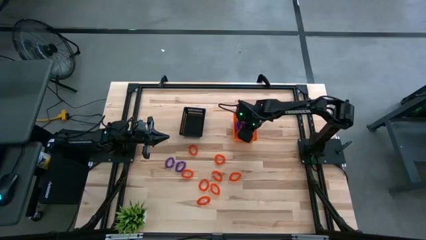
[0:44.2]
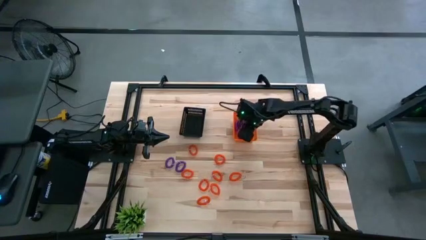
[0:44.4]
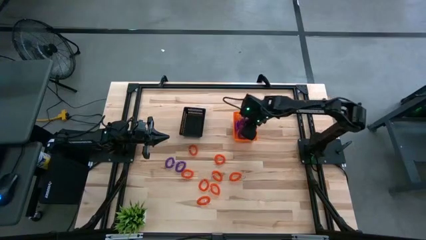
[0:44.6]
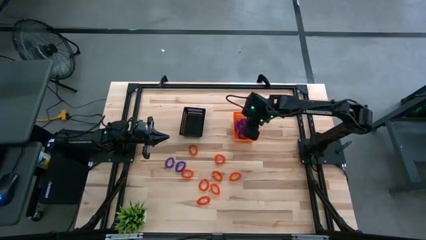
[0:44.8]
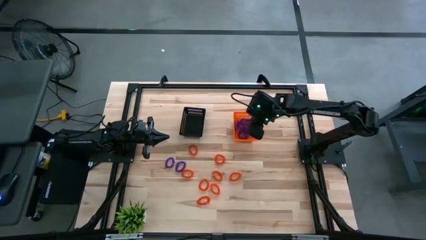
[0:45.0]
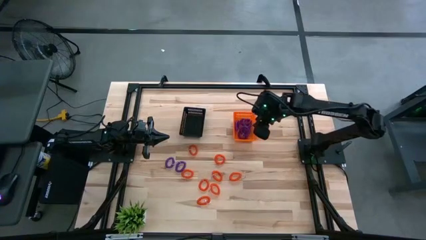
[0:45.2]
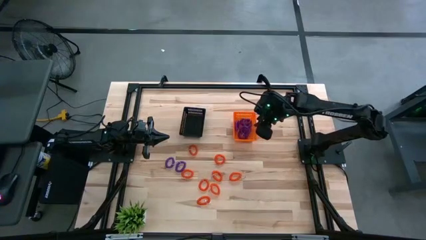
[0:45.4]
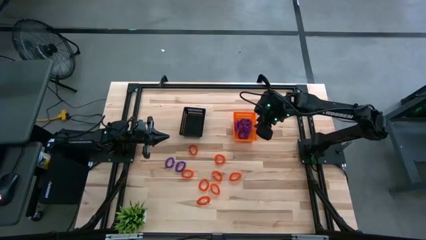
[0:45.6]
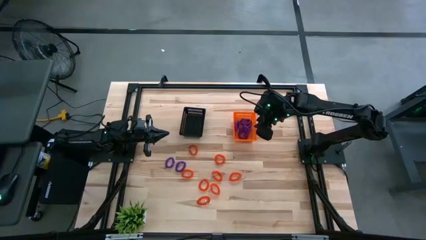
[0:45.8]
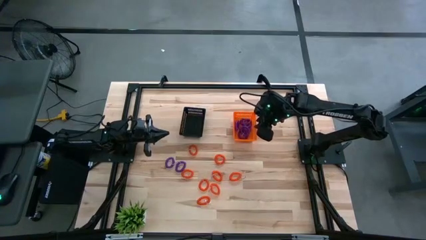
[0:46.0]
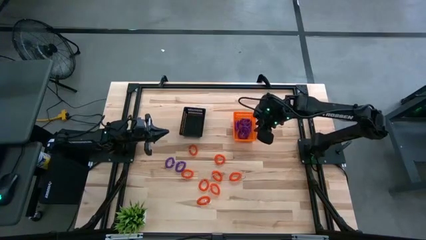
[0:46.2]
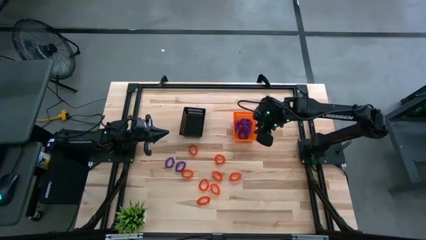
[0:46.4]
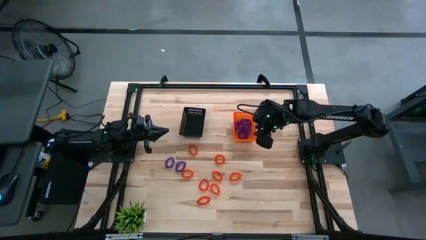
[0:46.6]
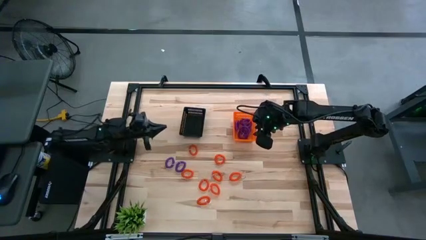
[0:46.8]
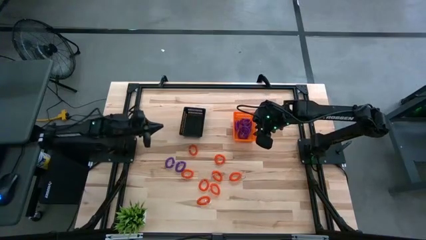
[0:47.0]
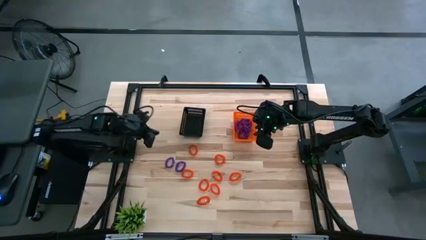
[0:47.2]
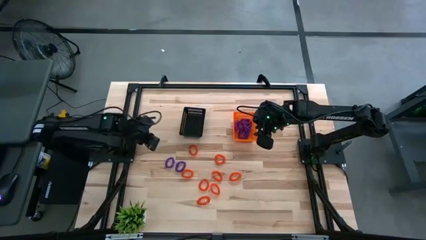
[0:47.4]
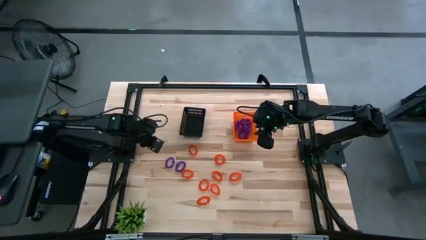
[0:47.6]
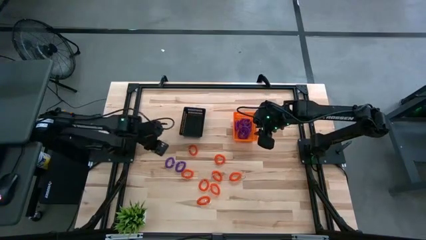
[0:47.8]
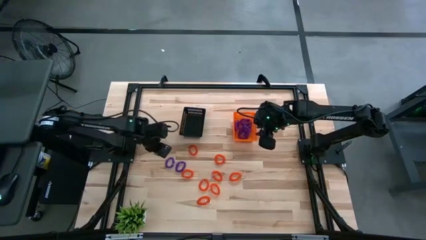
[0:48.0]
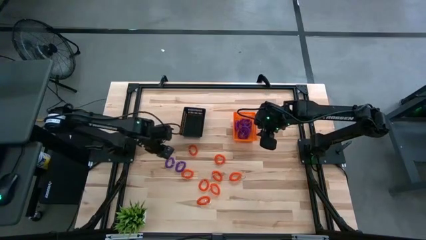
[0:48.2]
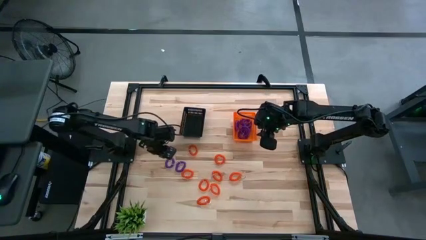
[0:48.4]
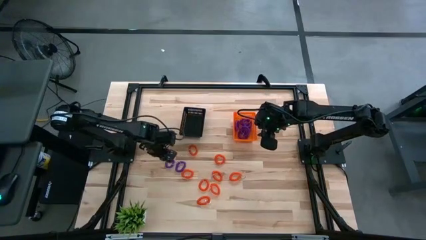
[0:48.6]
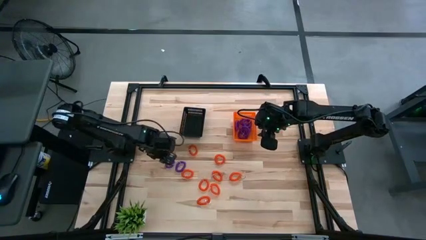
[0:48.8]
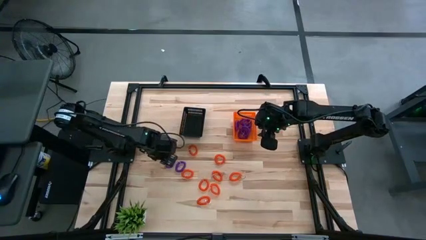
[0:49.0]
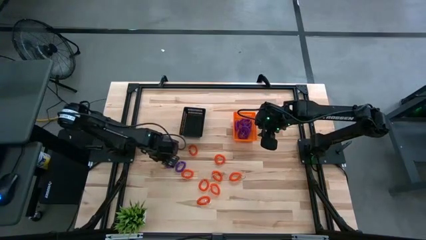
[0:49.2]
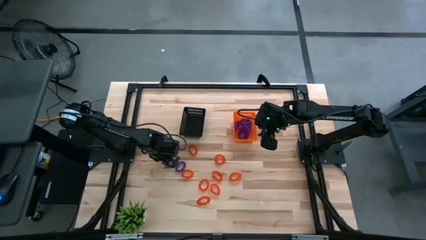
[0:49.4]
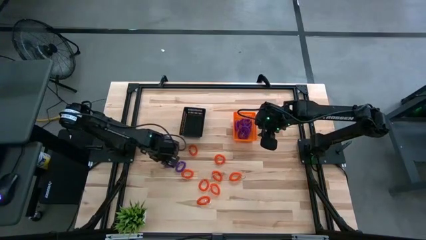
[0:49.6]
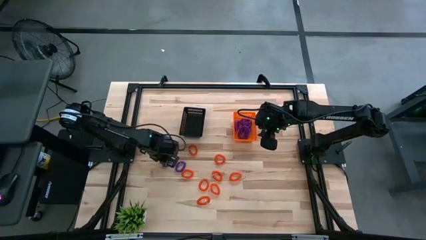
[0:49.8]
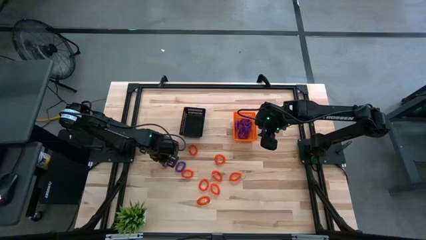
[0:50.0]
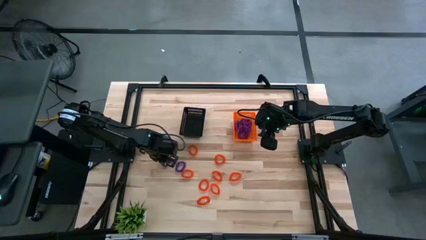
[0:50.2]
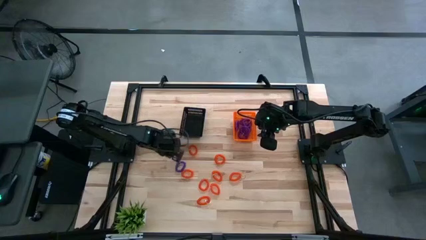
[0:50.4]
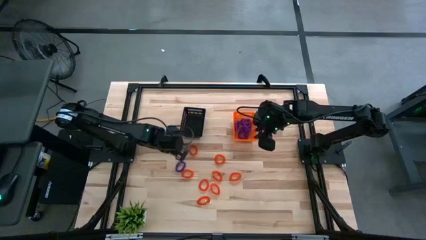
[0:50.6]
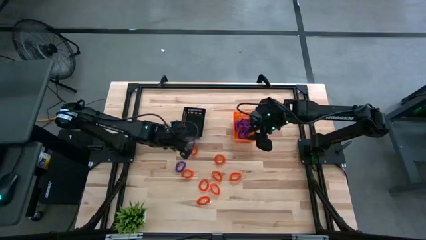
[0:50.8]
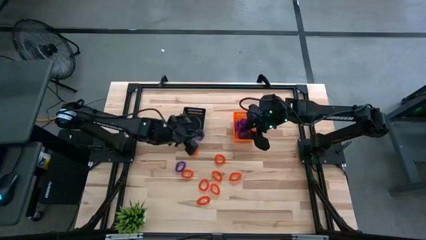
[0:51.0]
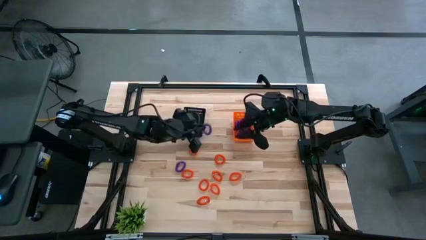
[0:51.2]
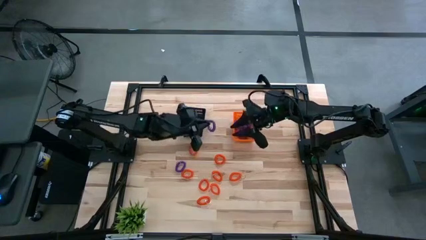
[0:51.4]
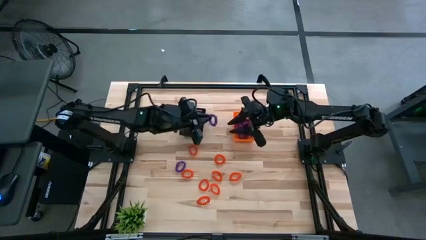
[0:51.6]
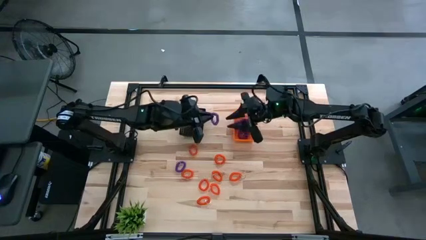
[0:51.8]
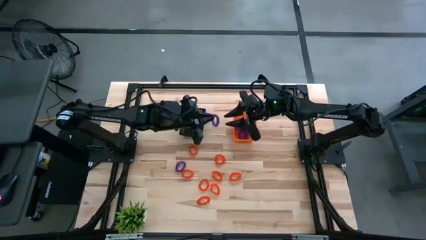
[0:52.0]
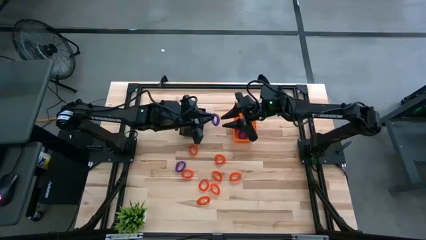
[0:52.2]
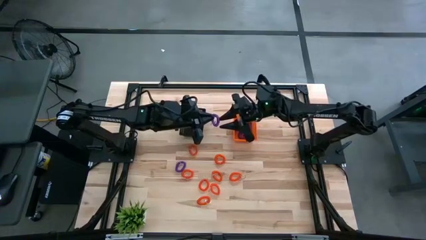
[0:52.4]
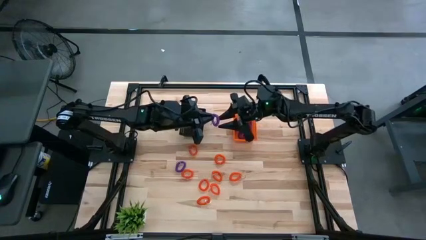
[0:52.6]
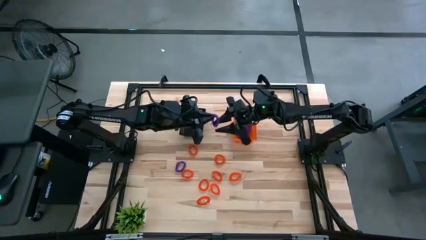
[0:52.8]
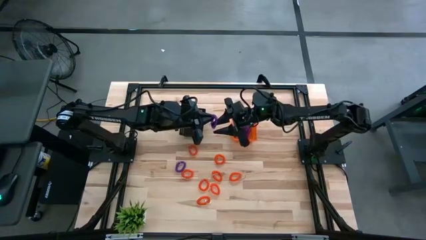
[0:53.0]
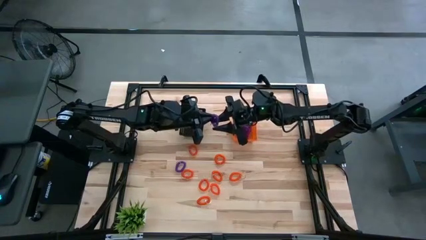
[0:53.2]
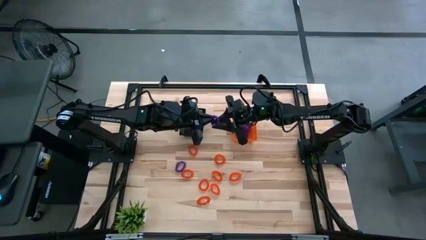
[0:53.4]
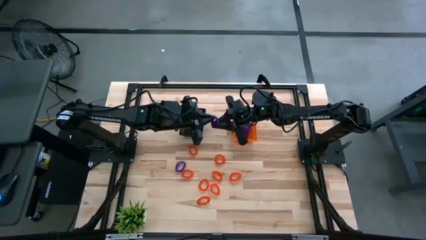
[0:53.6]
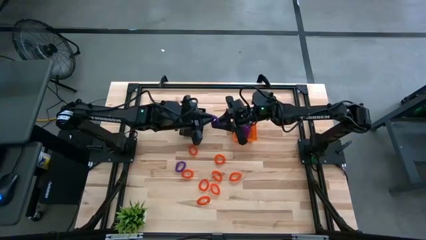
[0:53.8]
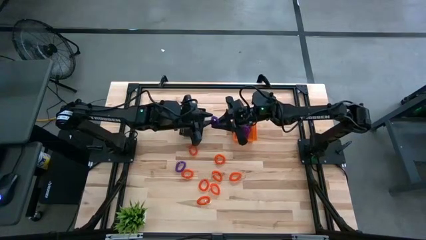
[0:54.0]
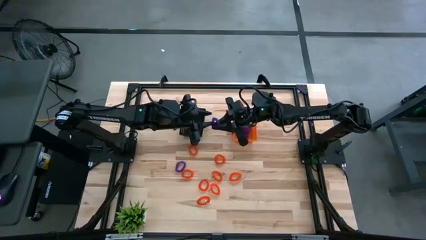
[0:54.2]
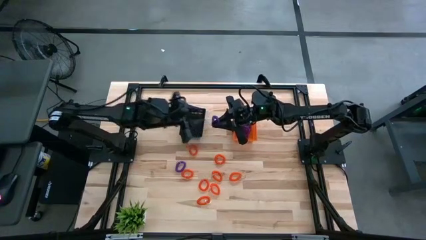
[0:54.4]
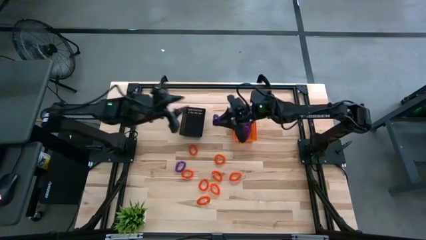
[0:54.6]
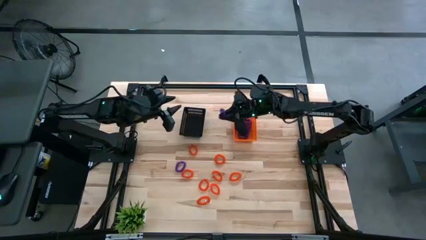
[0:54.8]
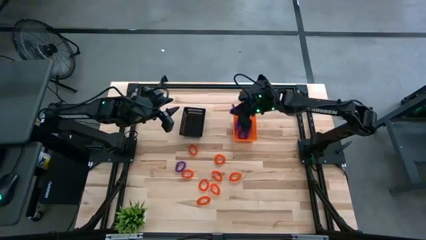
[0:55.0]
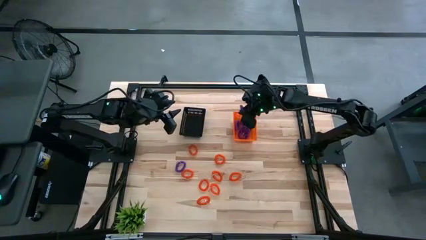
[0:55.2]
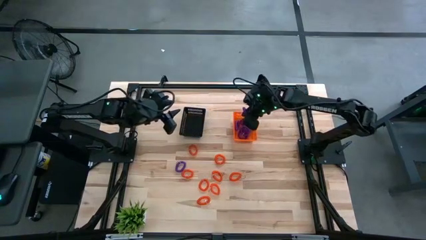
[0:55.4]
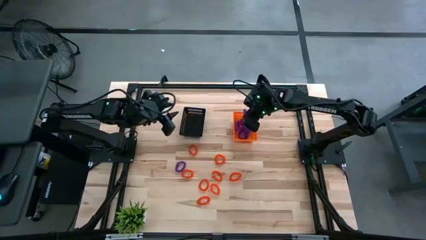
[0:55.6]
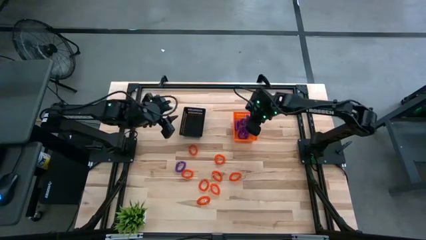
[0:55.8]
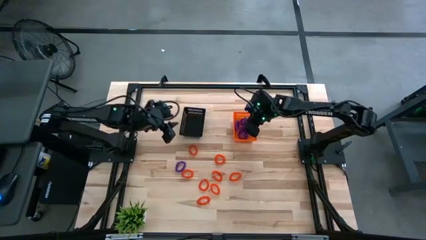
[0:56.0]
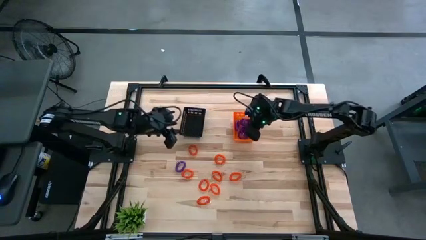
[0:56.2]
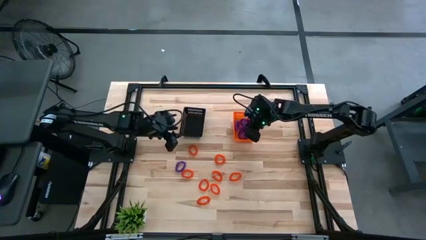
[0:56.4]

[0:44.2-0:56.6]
Task: Sort spring keychains into baskets
Put the violet spring keychain into the orange basket

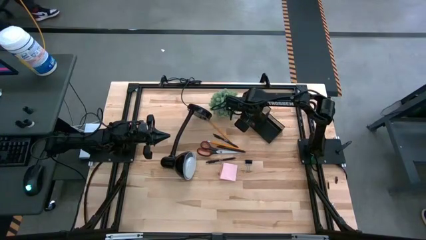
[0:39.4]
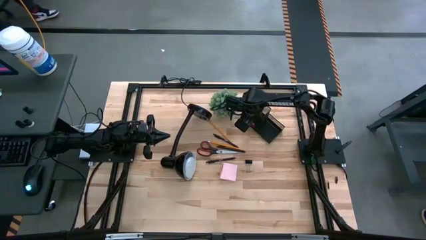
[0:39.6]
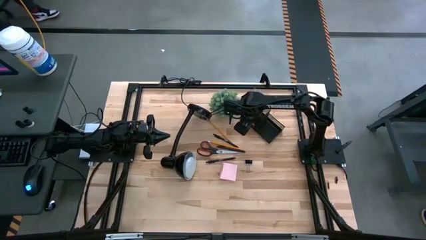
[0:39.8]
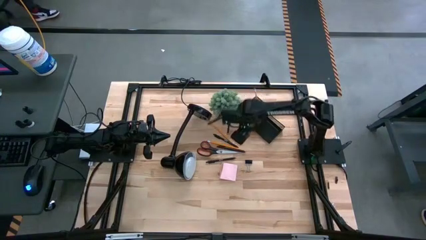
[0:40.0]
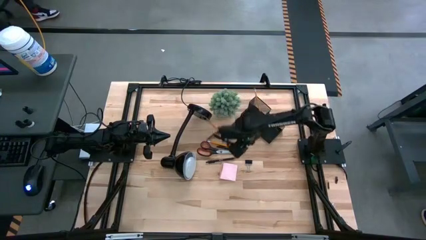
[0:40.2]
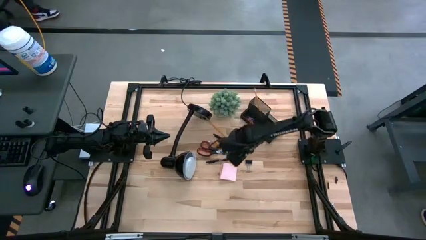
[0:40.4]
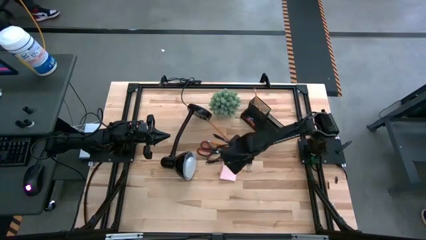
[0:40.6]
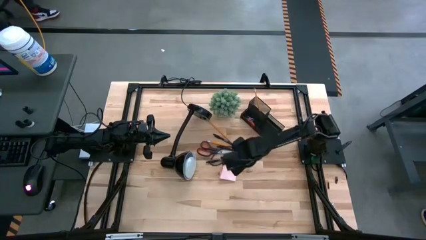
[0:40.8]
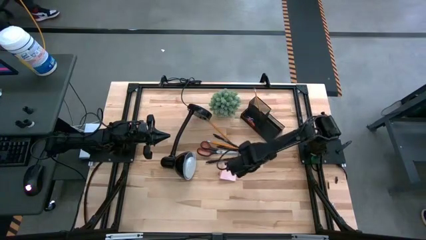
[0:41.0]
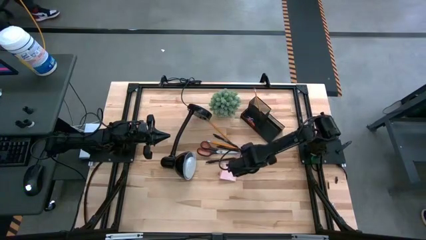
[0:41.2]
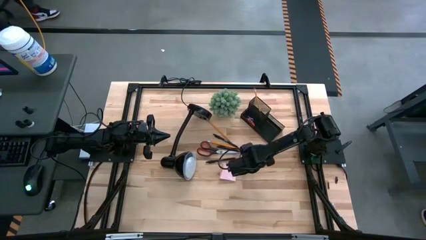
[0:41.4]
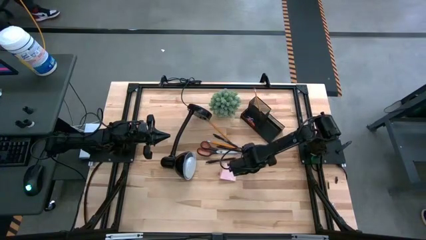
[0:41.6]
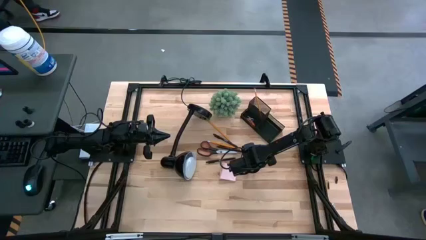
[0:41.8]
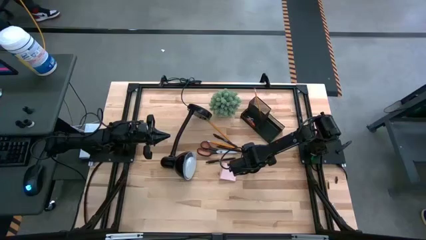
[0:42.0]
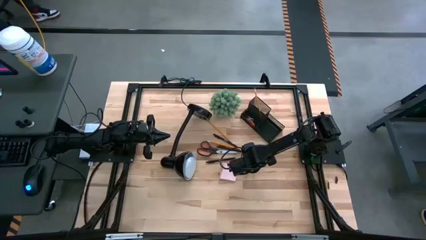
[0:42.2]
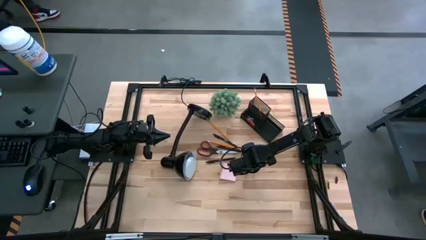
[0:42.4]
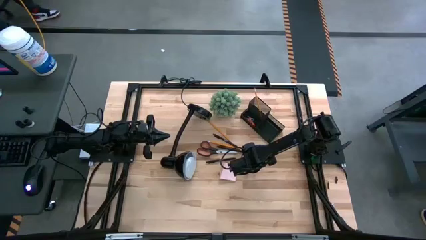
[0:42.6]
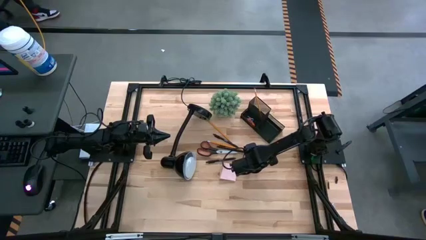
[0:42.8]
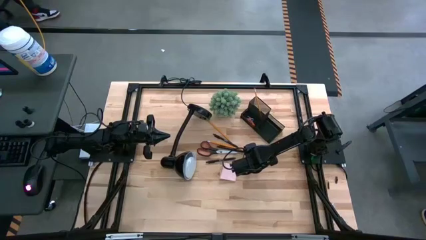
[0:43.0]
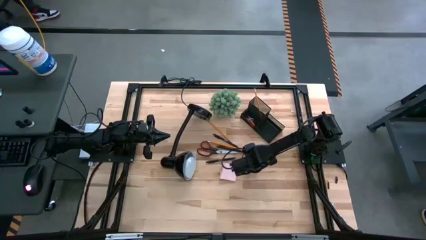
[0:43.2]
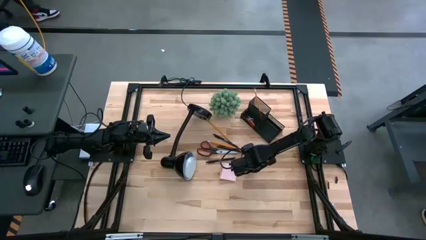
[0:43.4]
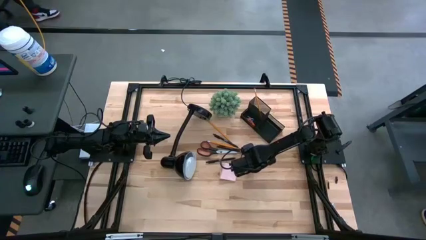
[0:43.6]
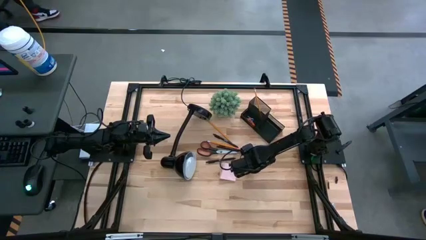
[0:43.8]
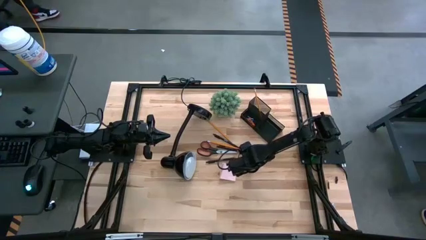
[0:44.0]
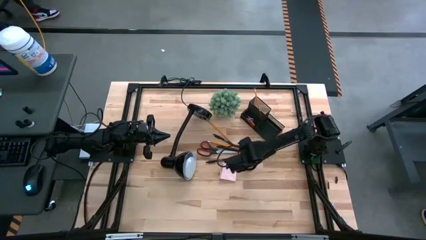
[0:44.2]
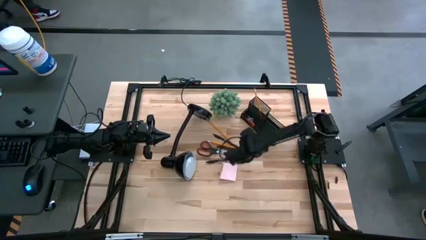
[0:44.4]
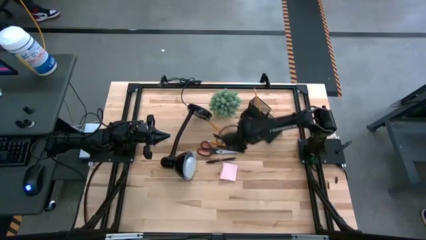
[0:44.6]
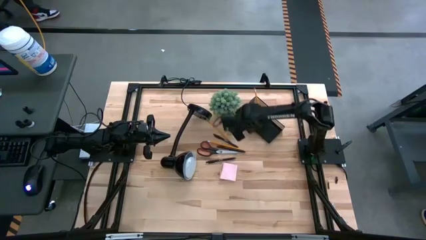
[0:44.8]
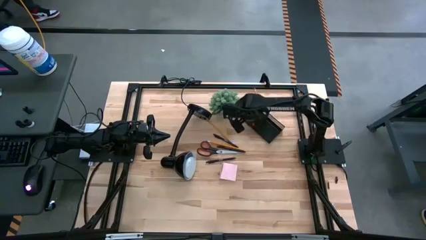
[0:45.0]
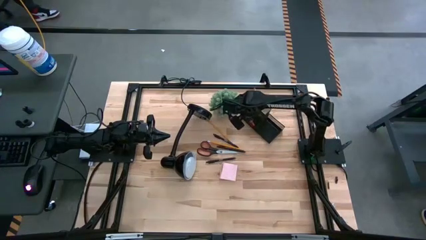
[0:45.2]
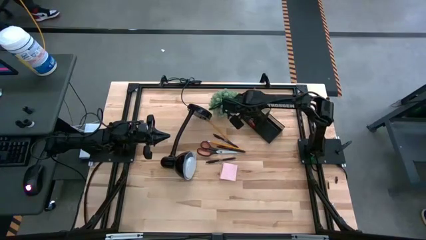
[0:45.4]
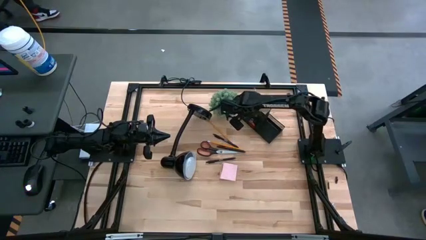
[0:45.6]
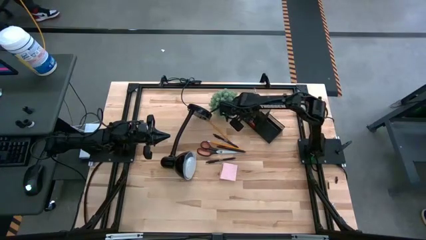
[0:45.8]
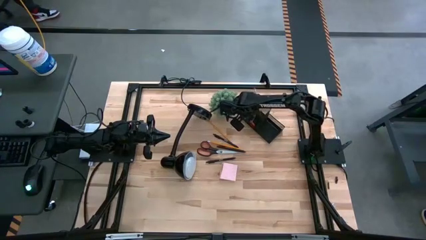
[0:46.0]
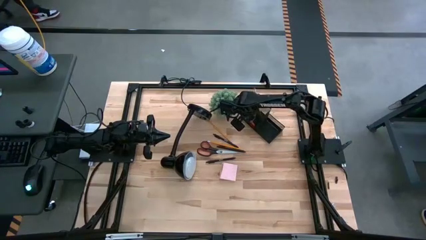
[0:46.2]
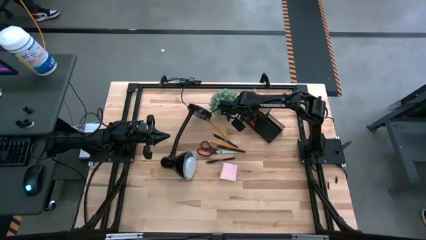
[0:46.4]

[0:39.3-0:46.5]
Task: Pick and place office supplies into organizer
Put the binder clip into the bottom left section of the desk organizer
